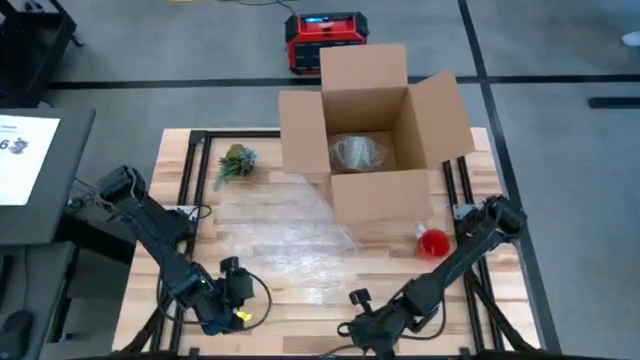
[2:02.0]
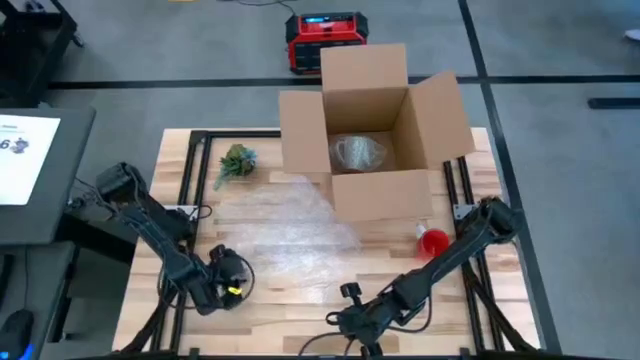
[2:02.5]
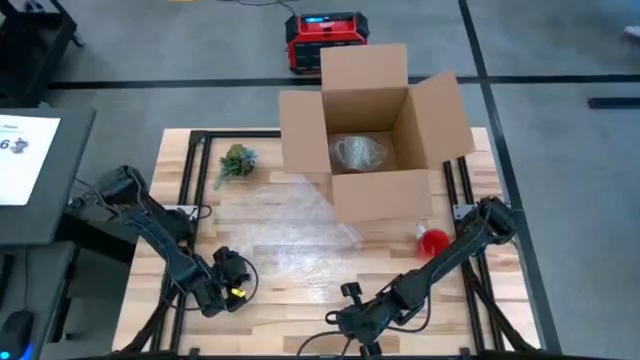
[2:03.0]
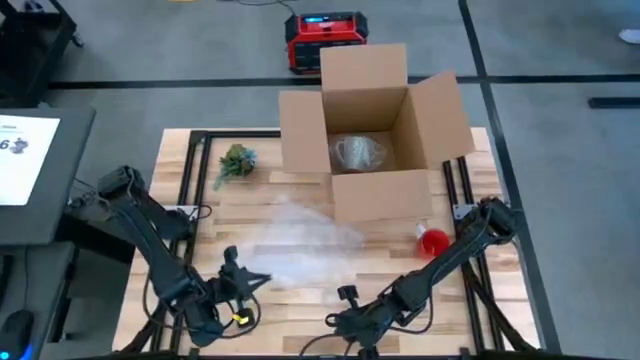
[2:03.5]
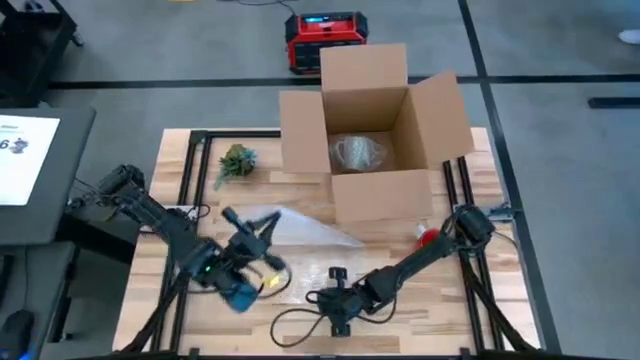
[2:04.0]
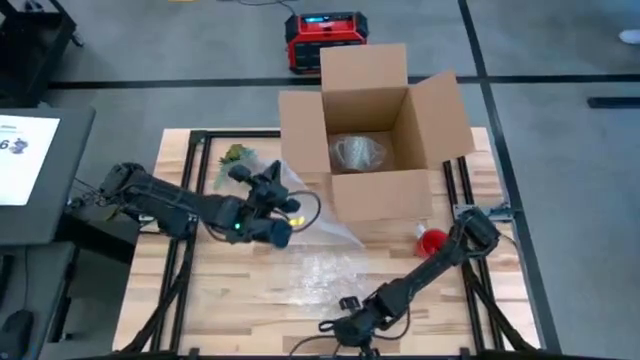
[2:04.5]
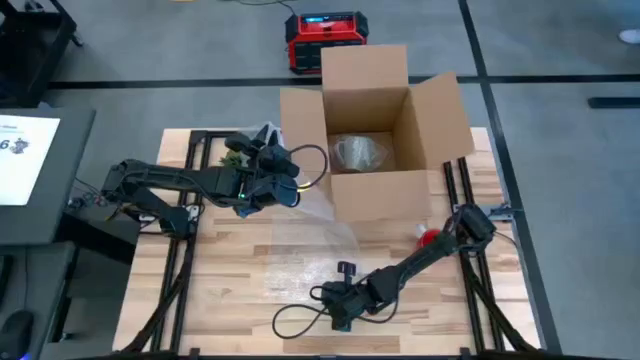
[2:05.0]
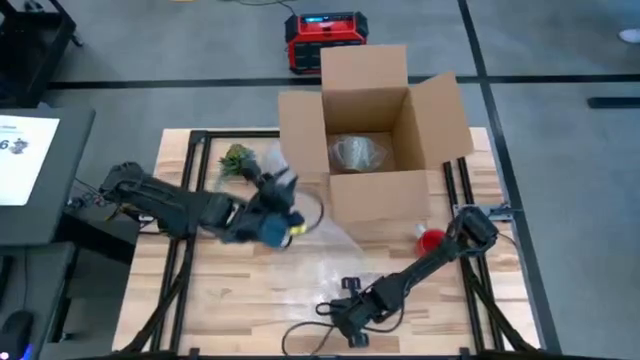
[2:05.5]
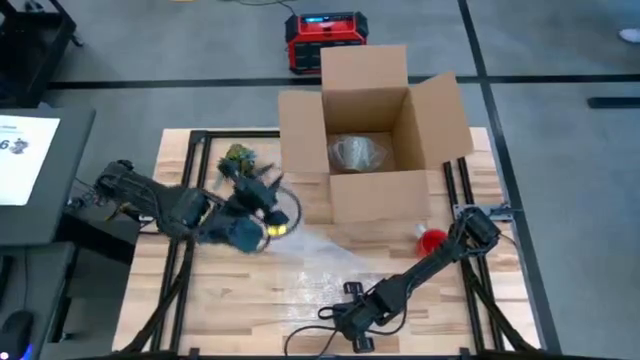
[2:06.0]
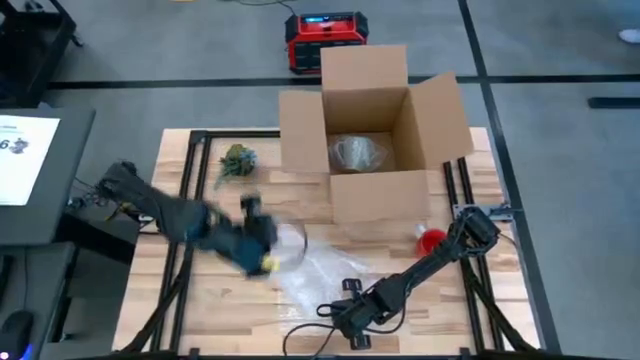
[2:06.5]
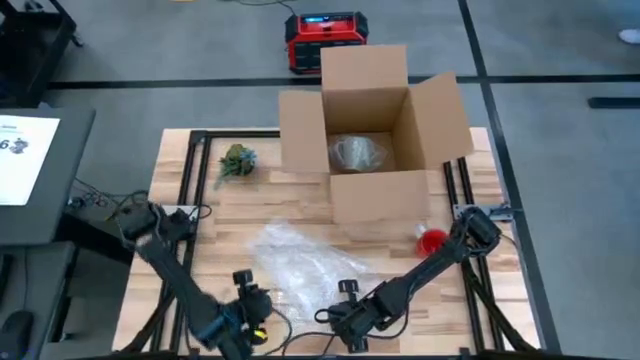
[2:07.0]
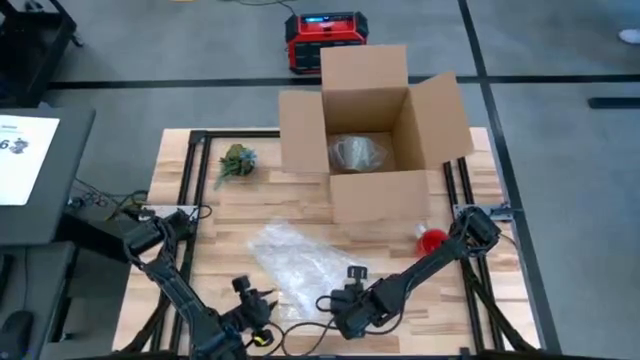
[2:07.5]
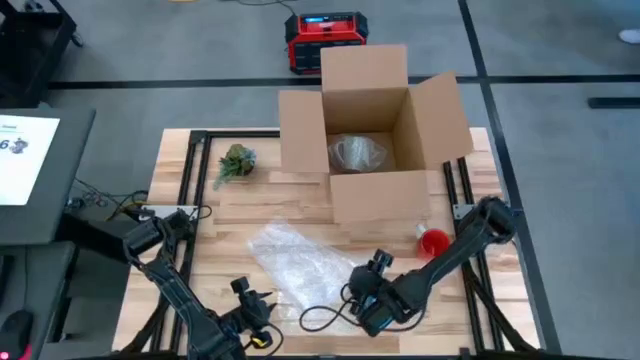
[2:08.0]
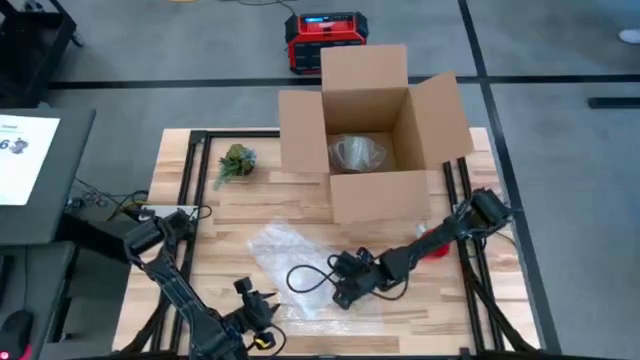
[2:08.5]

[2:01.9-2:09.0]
Task: wrap mug
Prepare the transparent bubble wrap

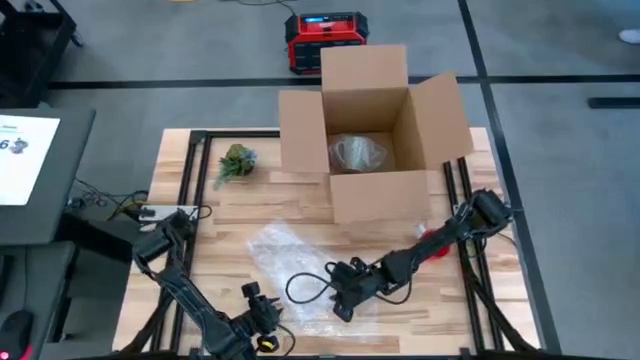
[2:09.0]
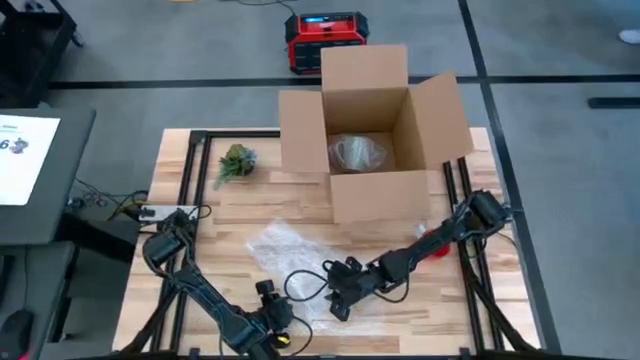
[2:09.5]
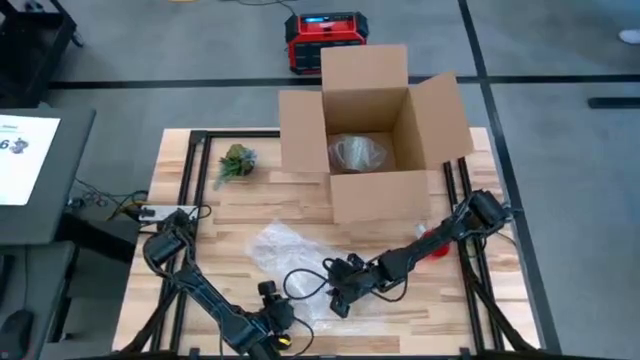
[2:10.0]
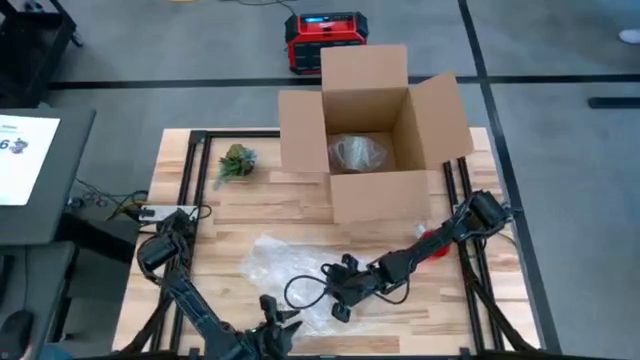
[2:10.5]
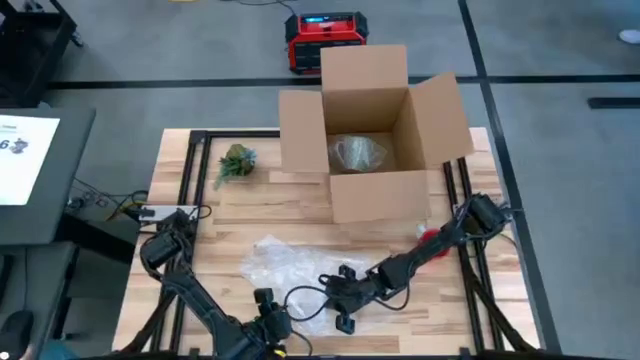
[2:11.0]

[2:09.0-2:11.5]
Prepare the transparent bubble wrap

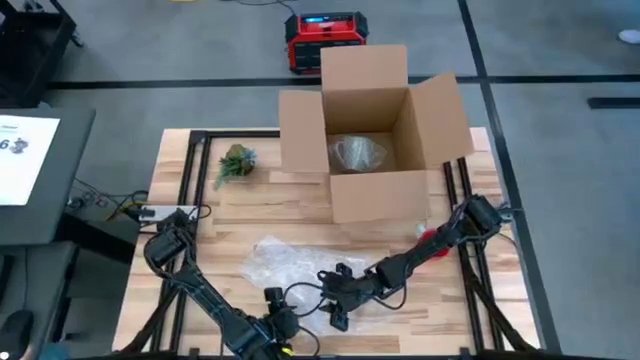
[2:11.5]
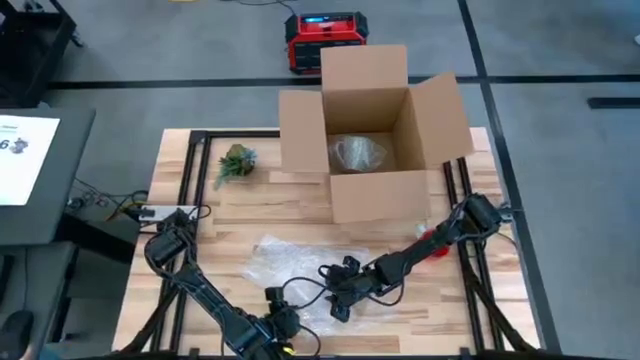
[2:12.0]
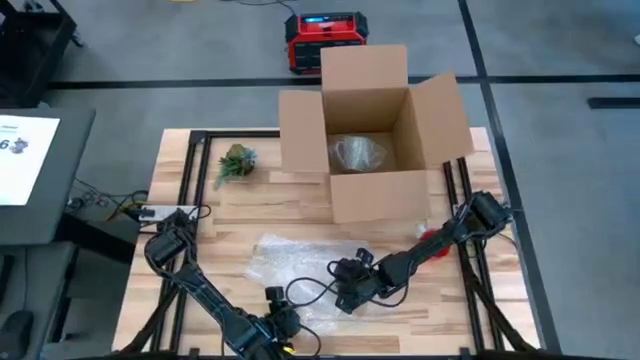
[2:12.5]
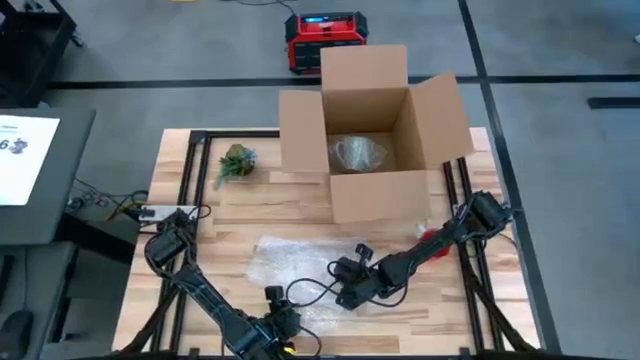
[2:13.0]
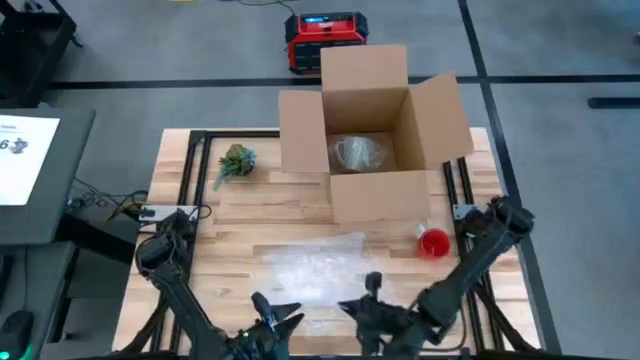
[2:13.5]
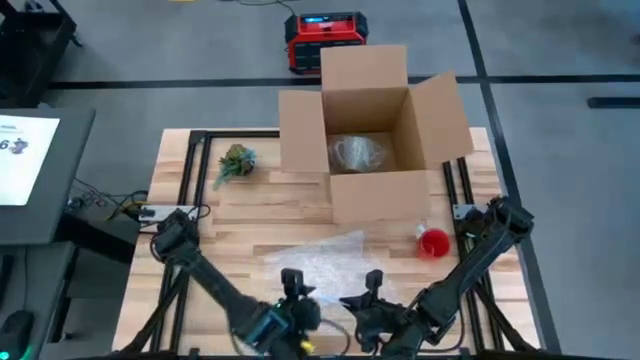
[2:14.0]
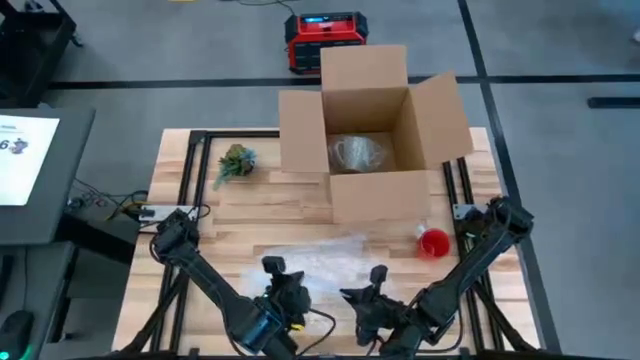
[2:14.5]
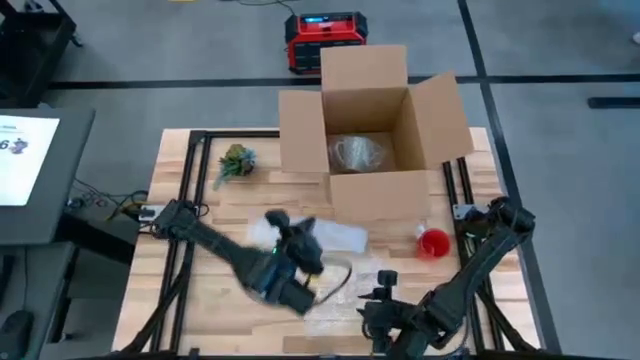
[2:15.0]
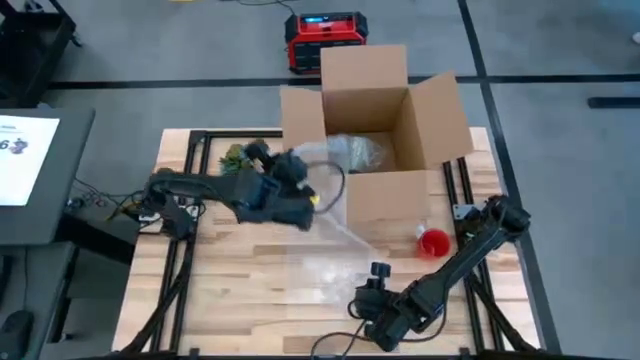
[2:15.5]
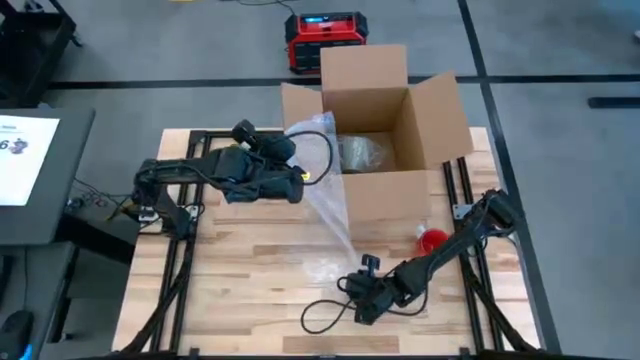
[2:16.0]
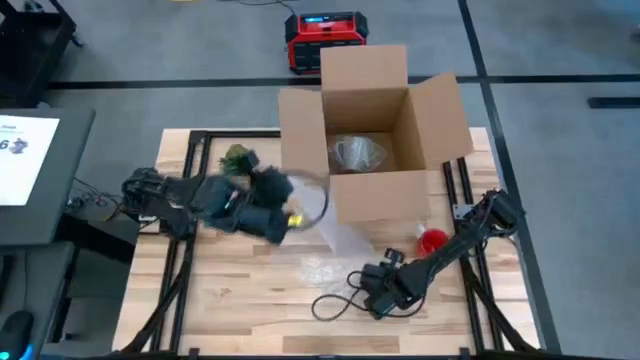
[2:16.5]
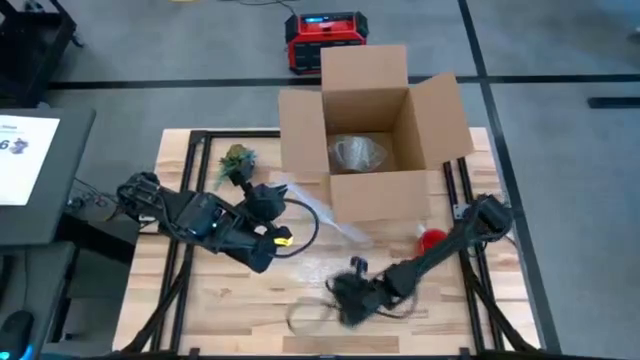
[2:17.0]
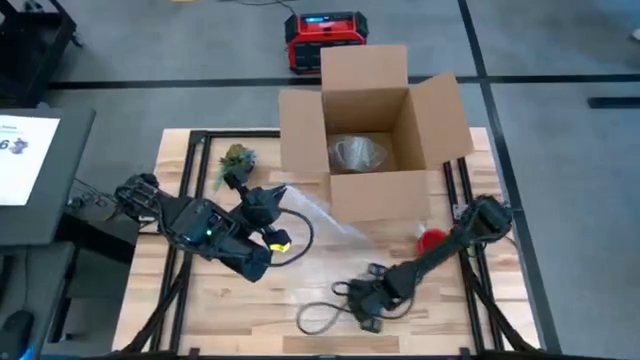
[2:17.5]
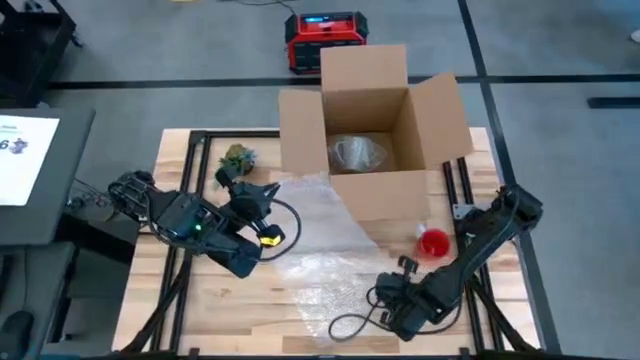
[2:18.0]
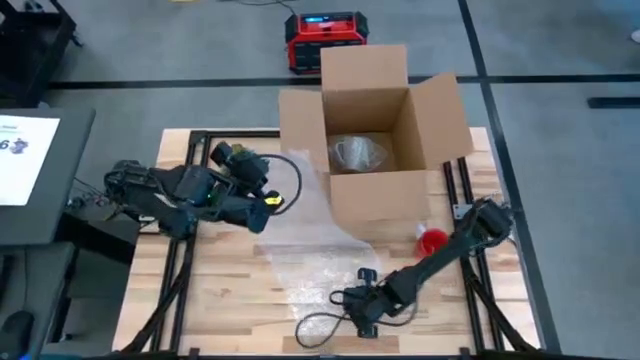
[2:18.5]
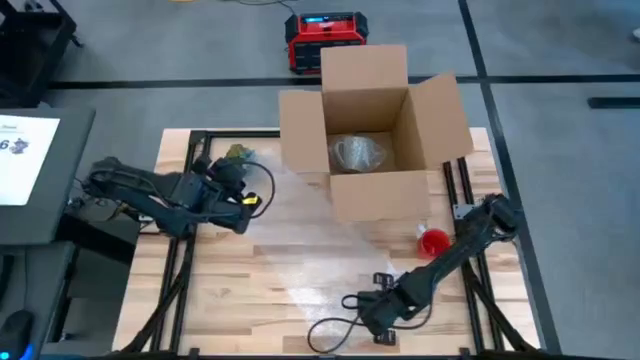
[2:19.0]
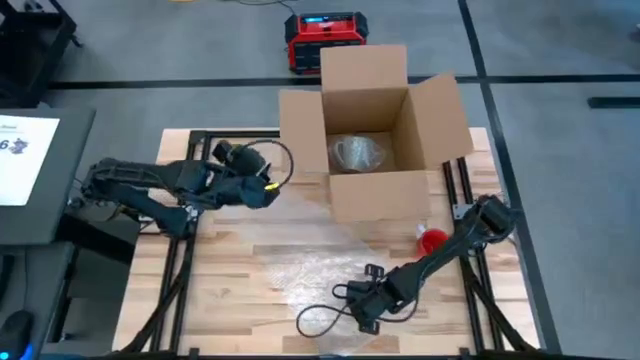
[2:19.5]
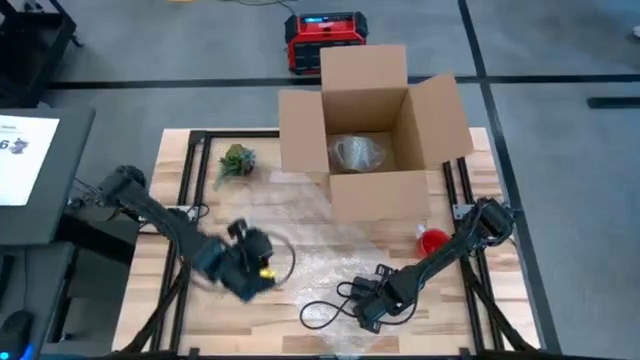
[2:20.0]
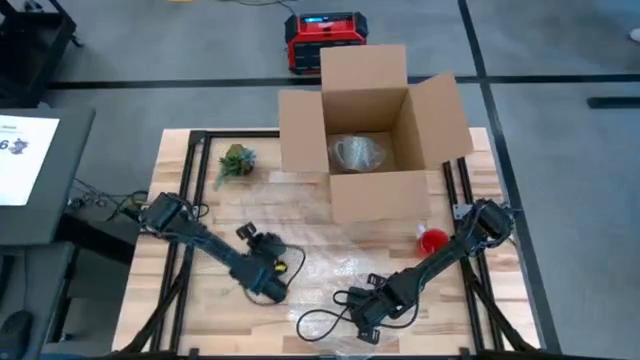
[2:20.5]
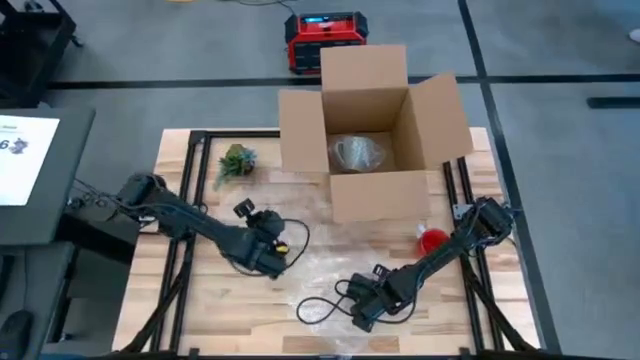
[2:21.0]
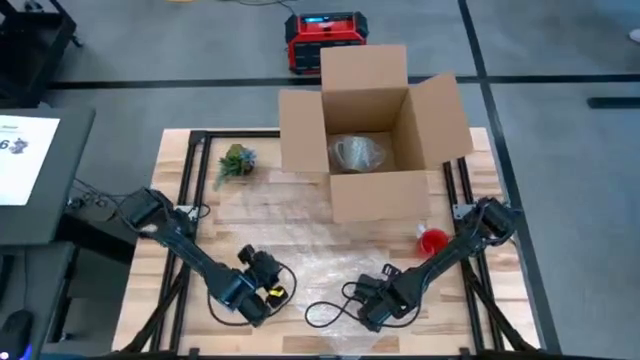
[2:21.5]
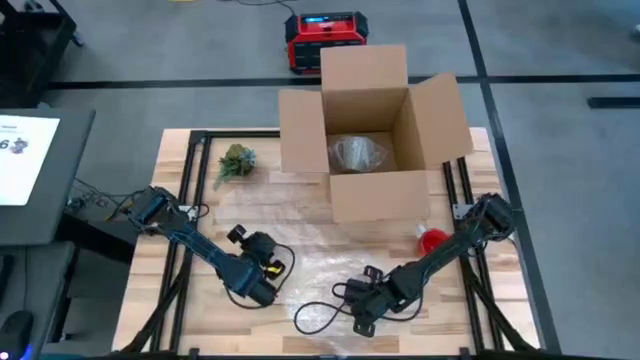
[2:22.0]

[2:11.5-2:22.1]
Prepare the transparent bubble wrap
